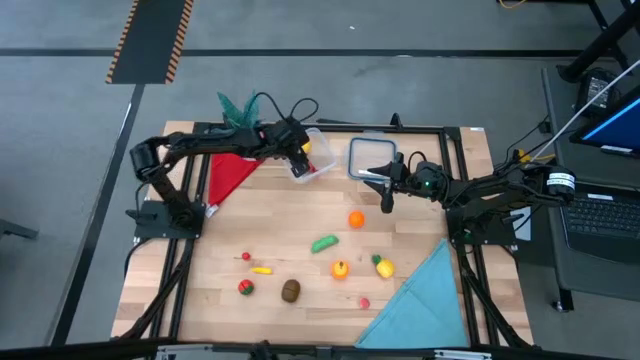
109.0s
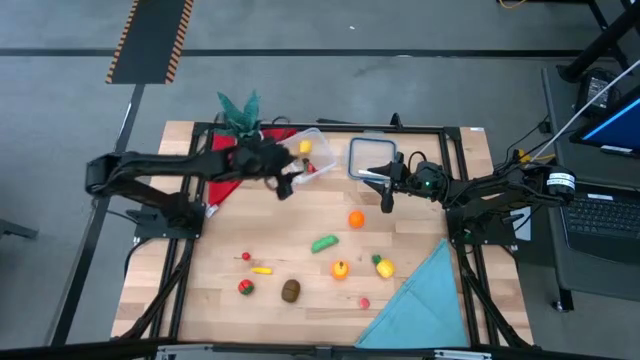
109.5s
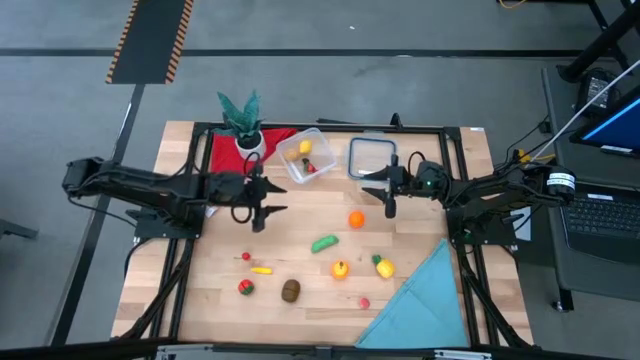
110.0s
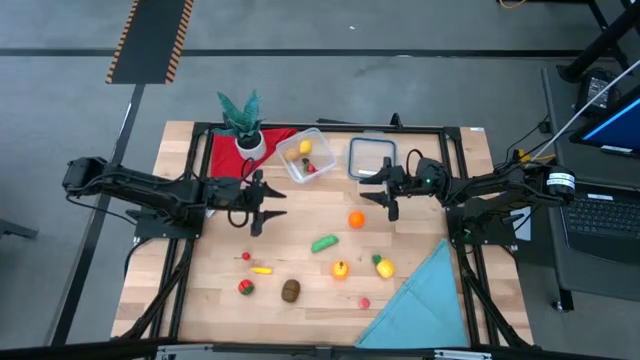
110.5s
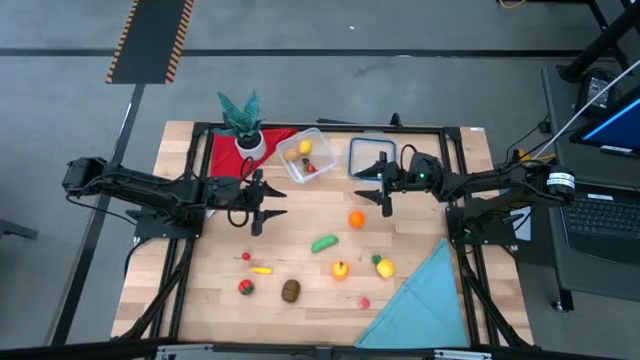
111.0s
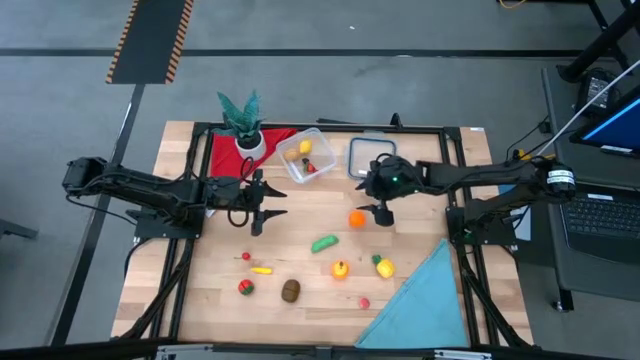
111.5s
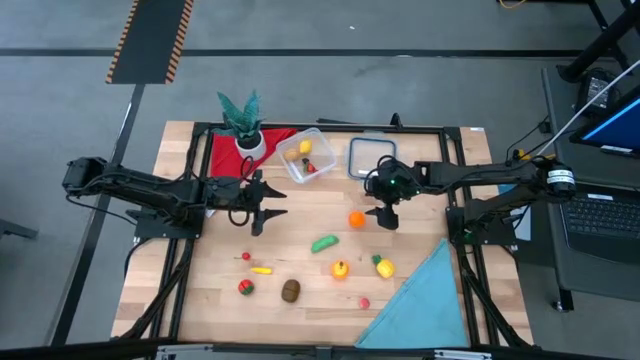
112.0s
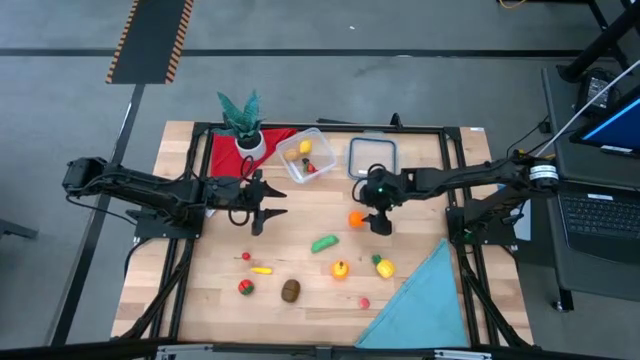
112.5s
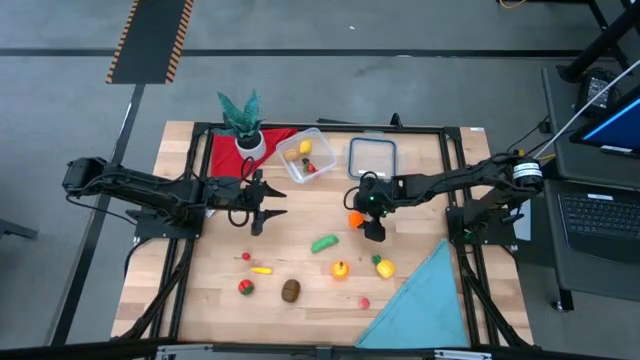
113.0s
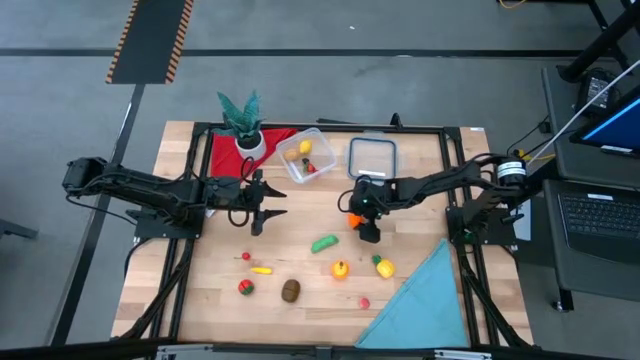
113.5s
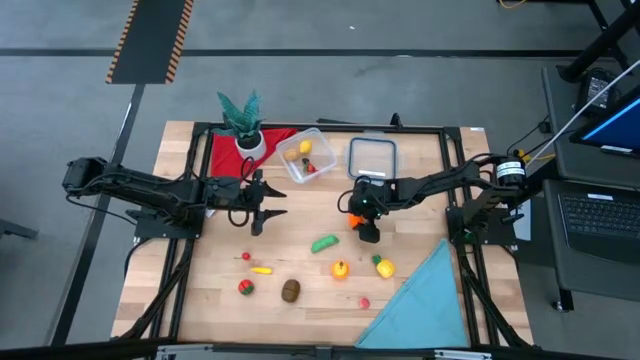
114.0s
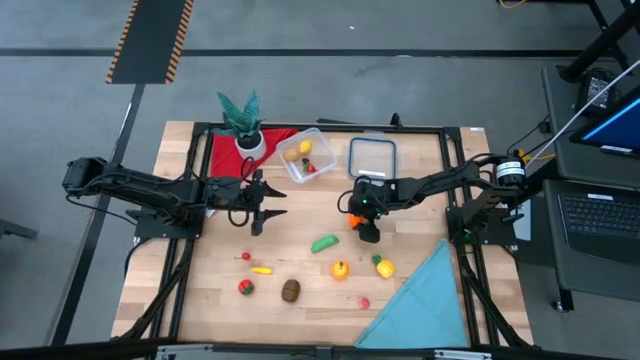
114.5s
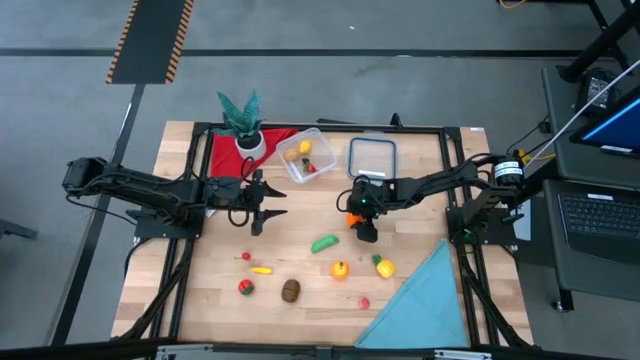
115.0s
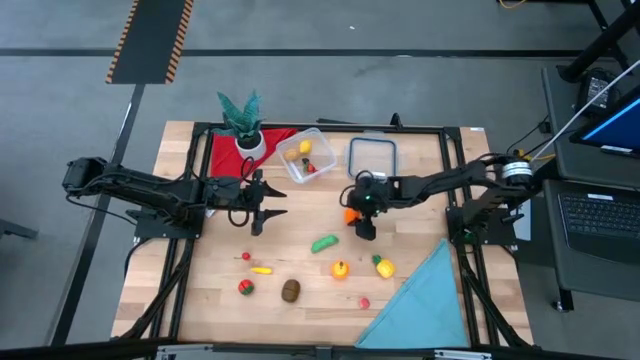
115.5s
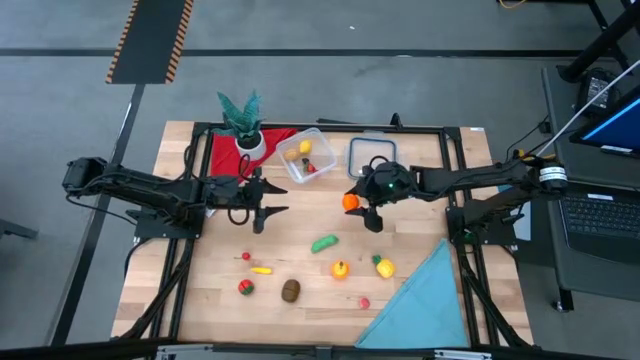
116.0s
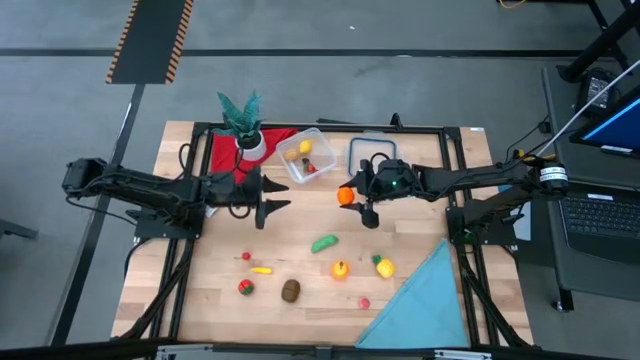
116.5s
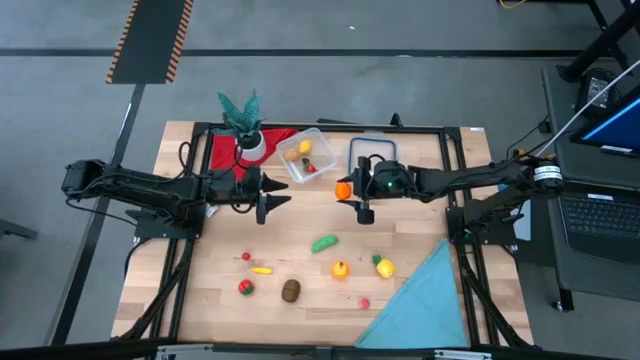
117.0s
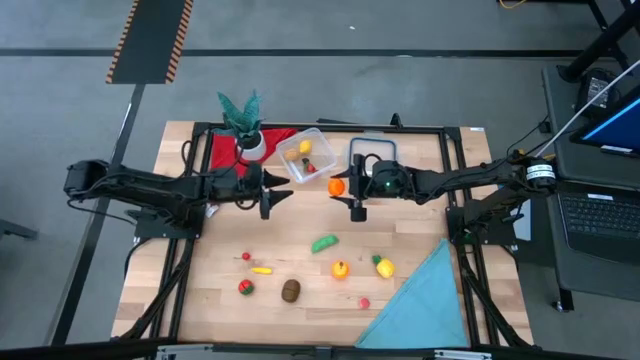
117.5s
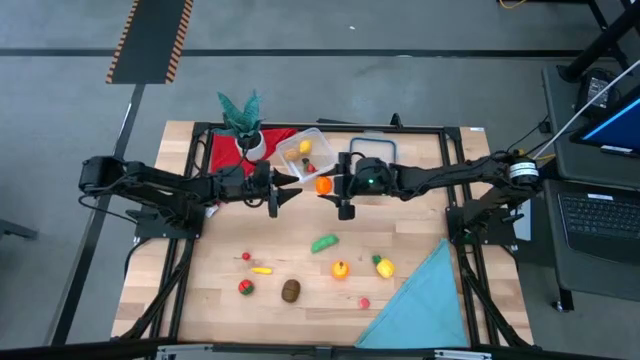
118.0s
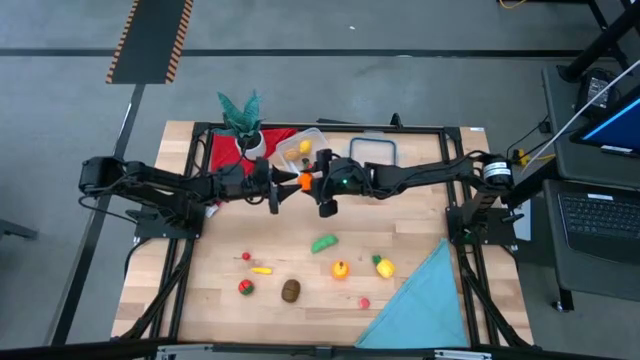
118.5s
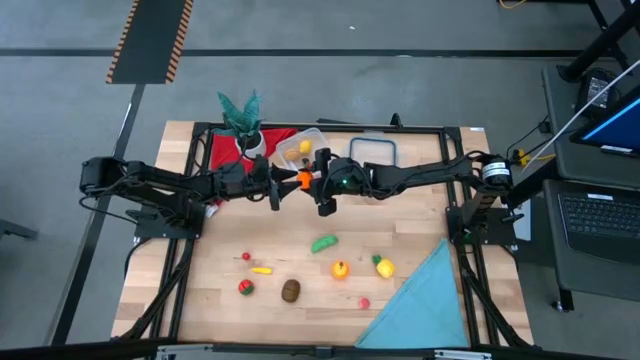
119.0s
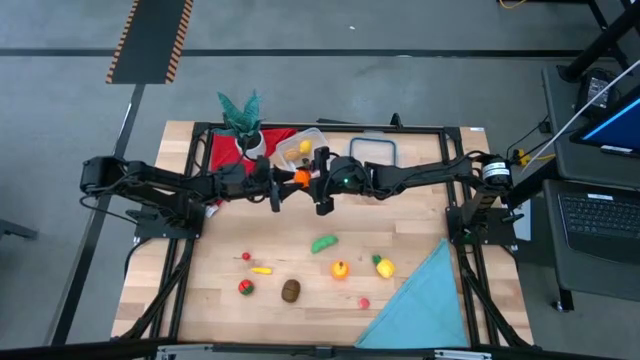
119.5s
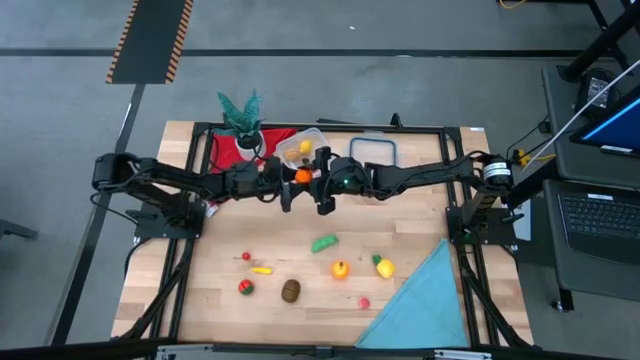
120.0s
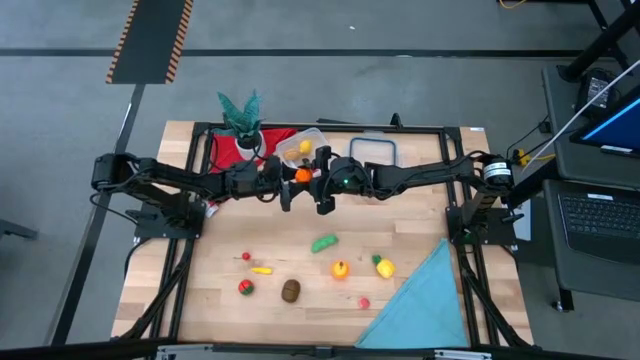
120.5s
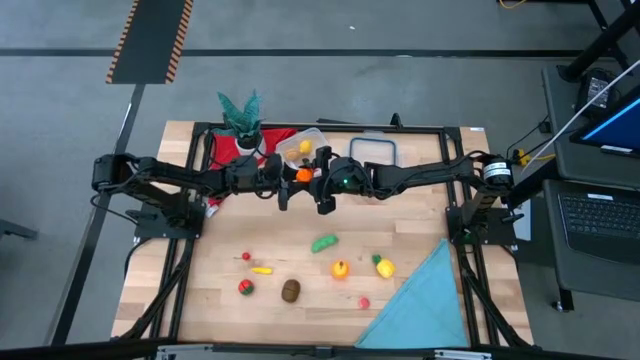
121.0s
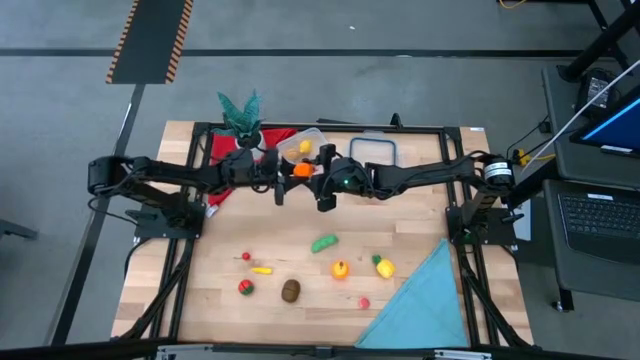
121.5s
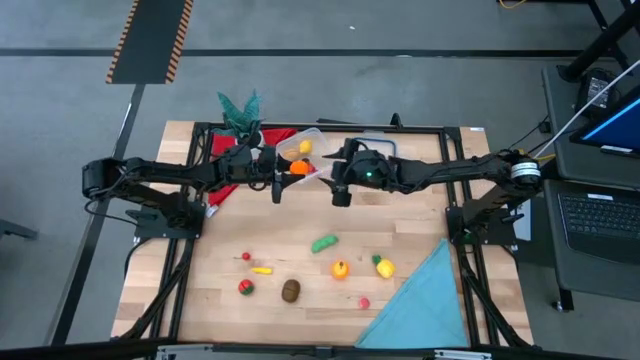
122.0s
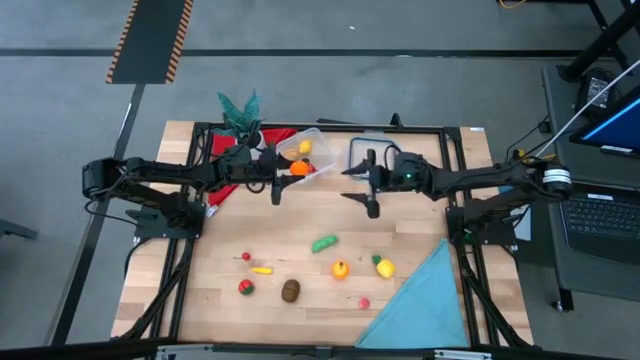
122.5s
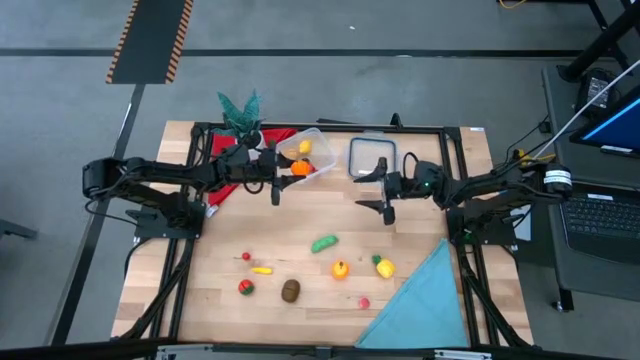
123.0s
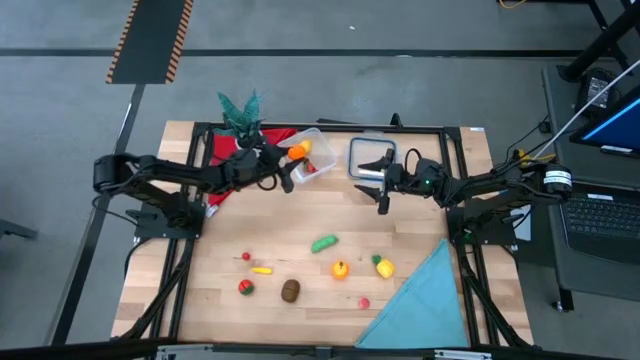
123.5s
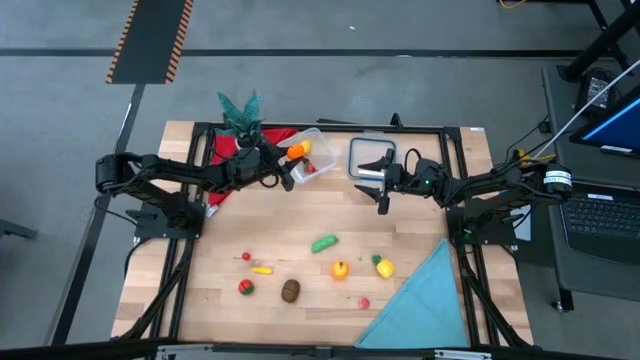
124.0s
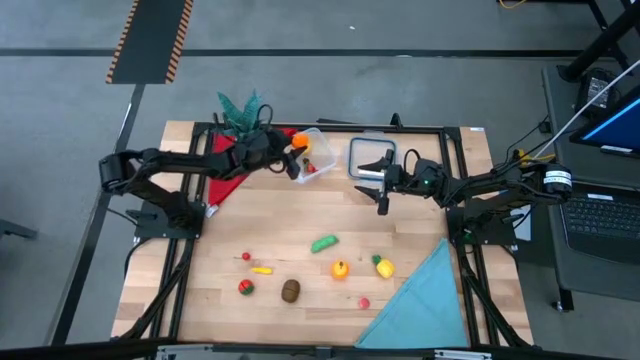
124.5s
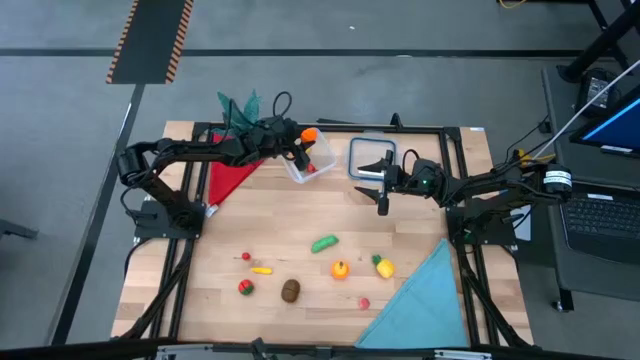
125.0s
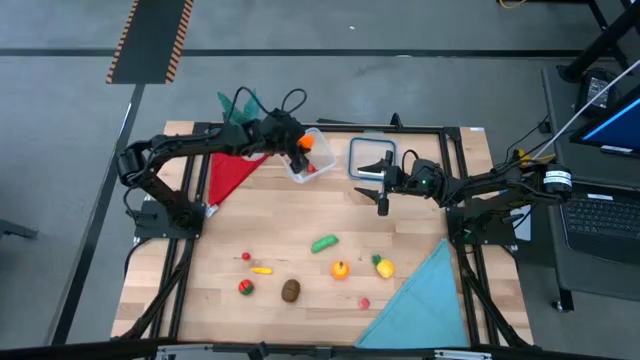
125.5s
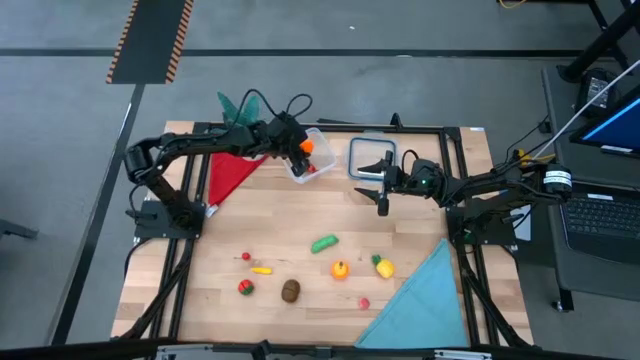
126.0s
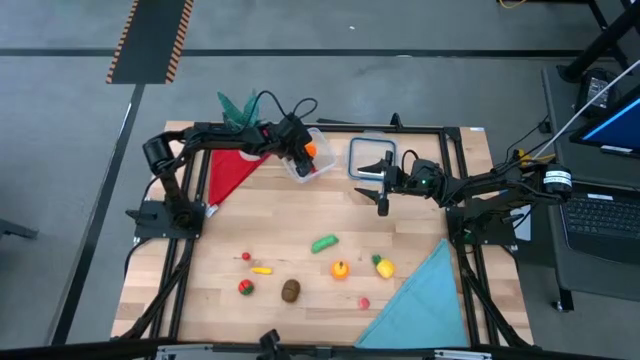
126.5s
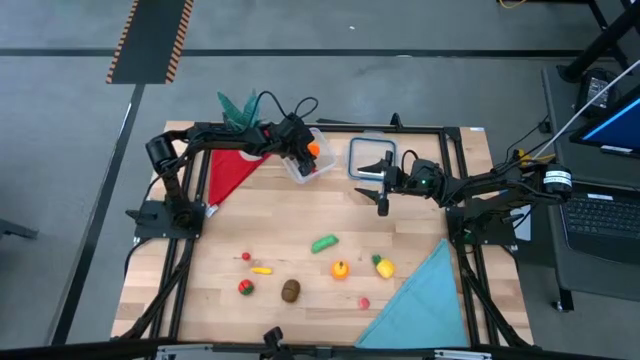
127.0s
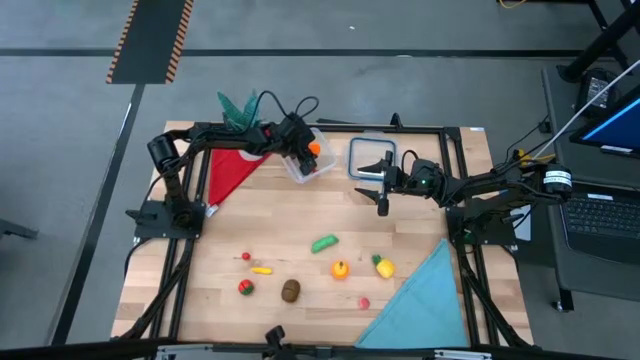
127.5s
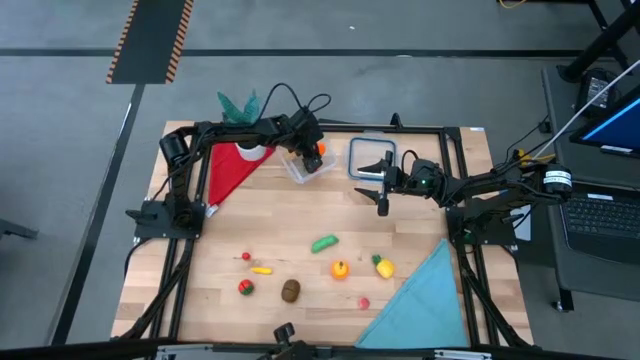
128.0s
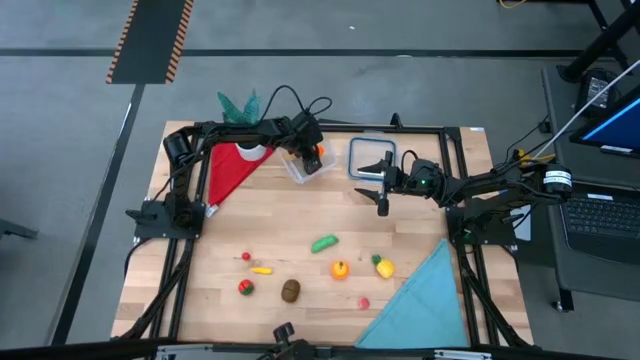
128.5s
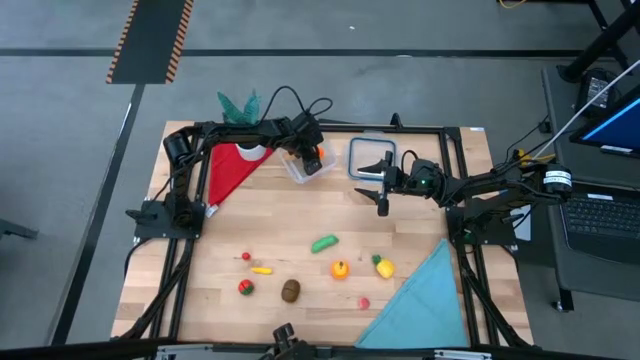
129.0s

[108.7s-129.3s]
Task: Pick and placing Produce into tupperware
Put the pumpkin into the transparent bin

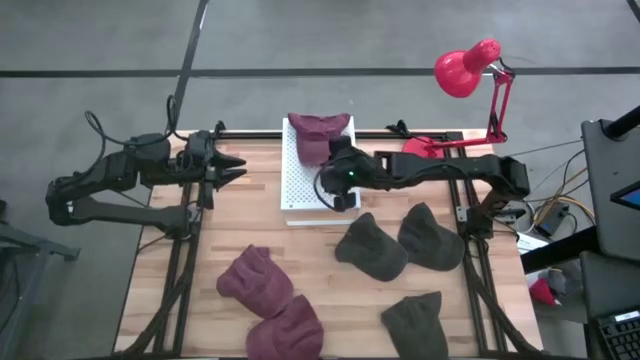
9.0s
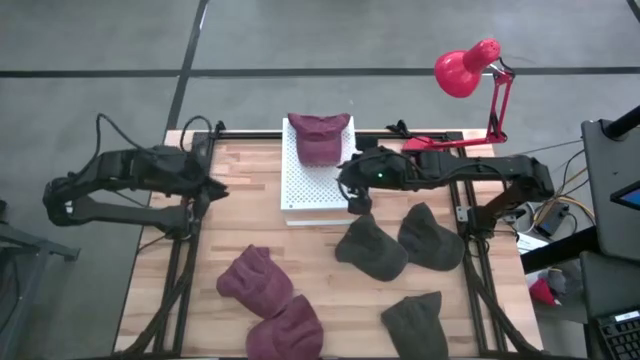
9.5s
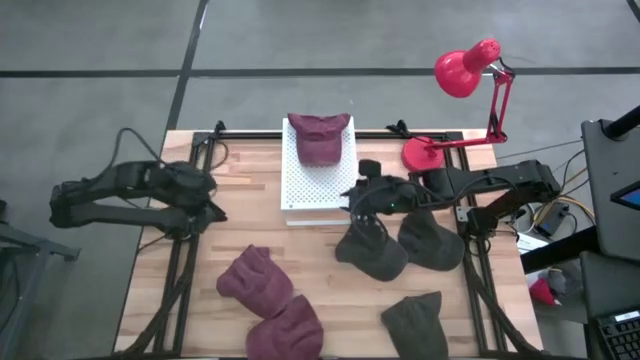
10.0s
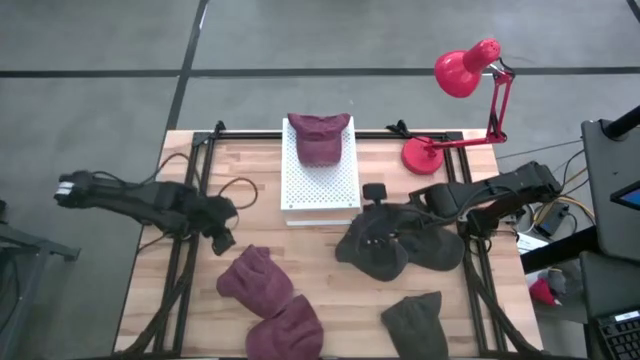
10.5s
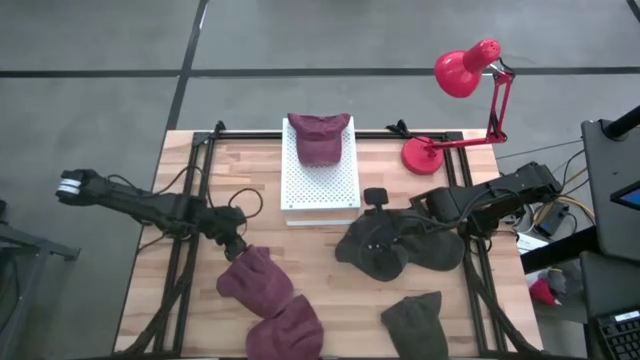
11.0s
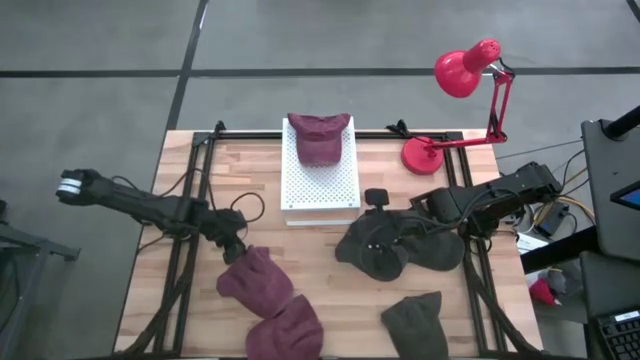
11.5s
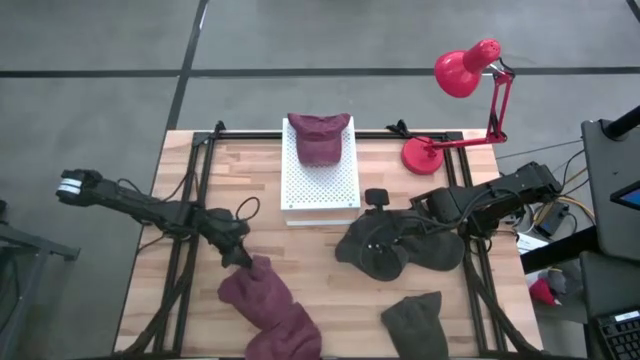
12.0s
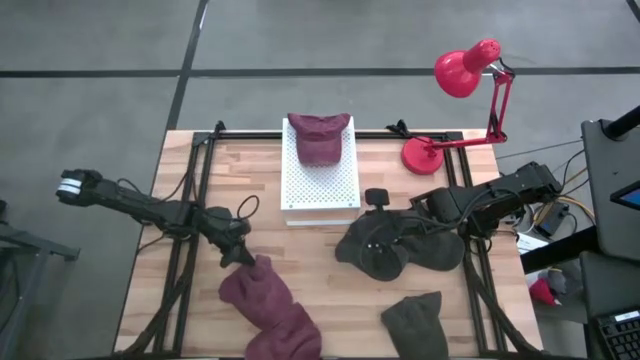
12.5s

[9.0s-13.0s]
Task: Pick & Place hat
Stack the top red cap on the red cap on the shelf
